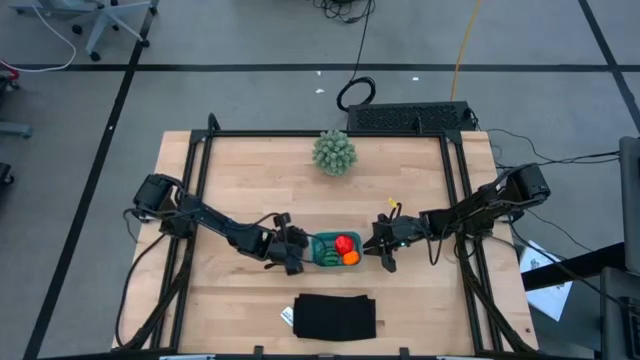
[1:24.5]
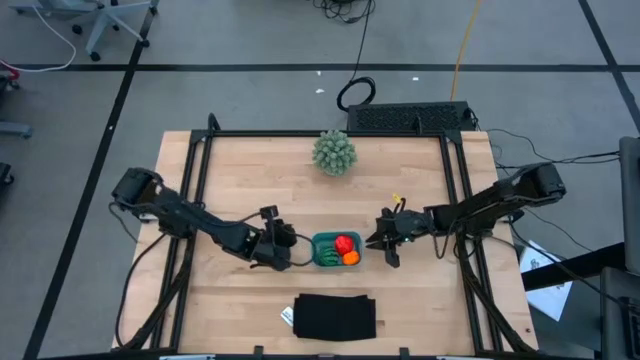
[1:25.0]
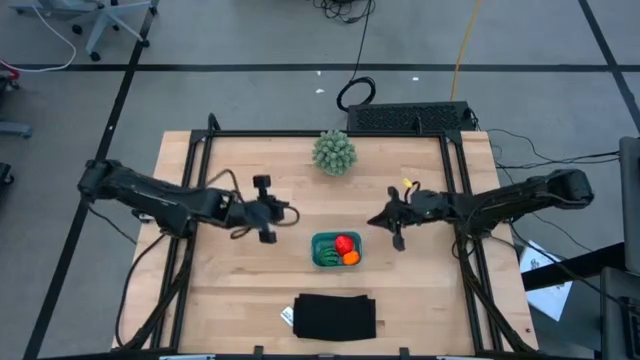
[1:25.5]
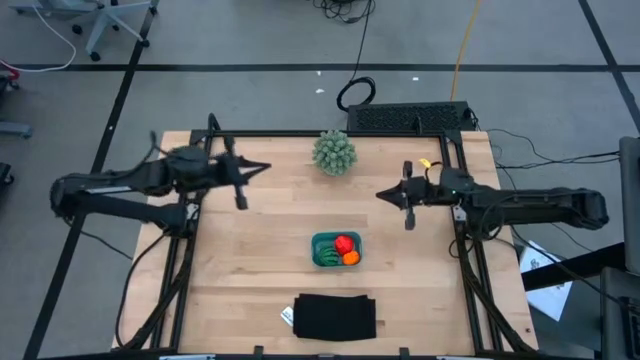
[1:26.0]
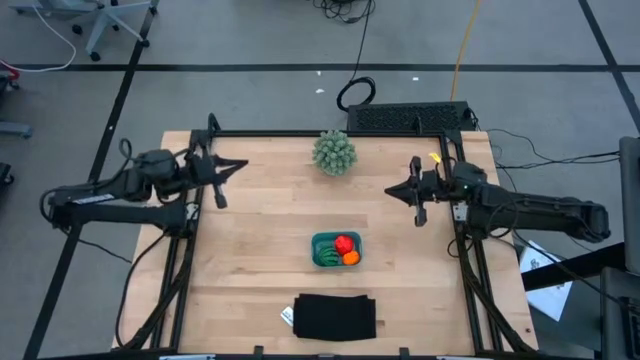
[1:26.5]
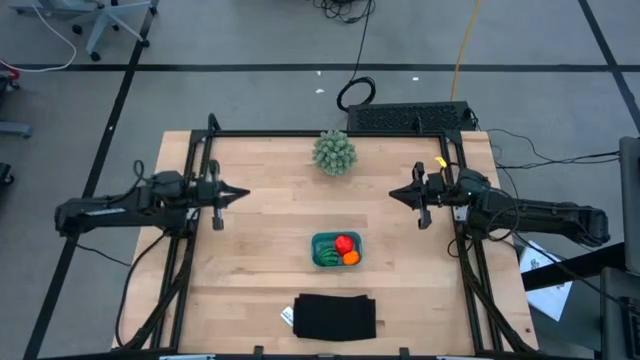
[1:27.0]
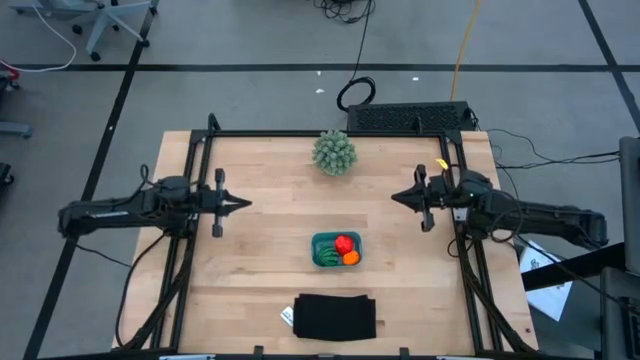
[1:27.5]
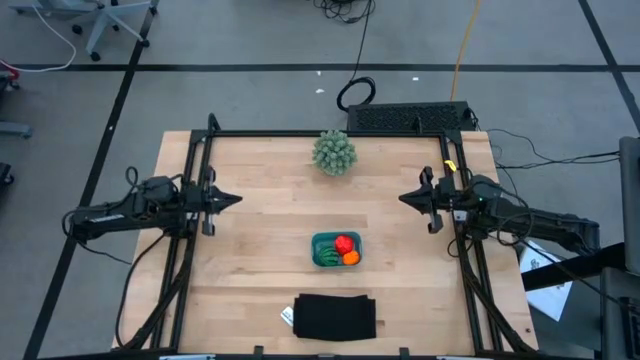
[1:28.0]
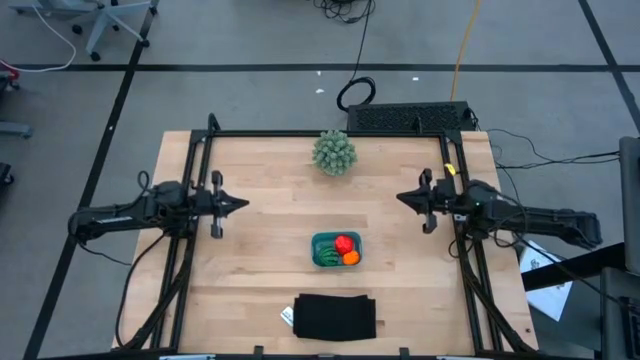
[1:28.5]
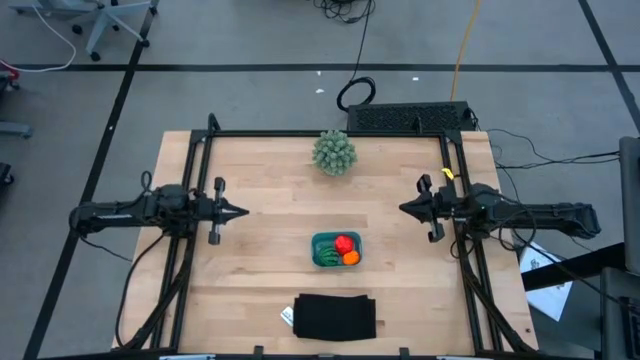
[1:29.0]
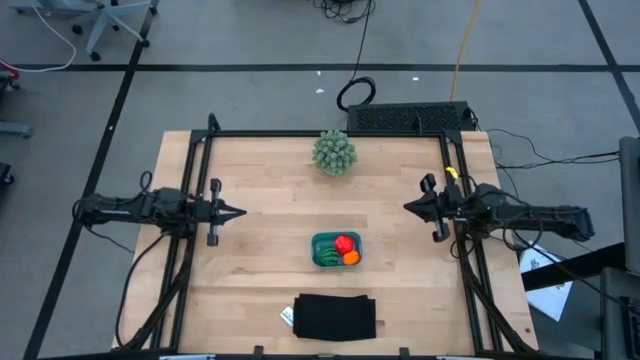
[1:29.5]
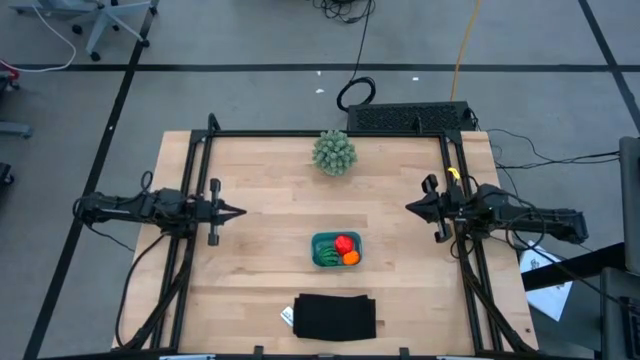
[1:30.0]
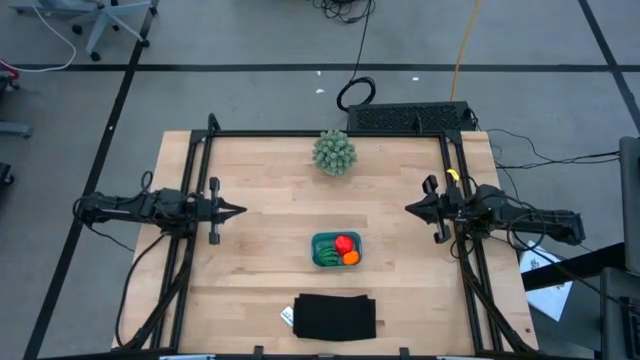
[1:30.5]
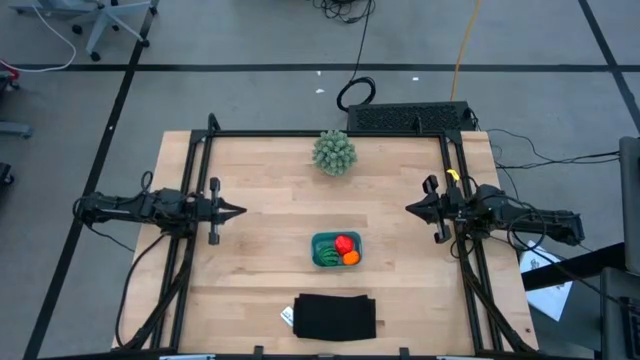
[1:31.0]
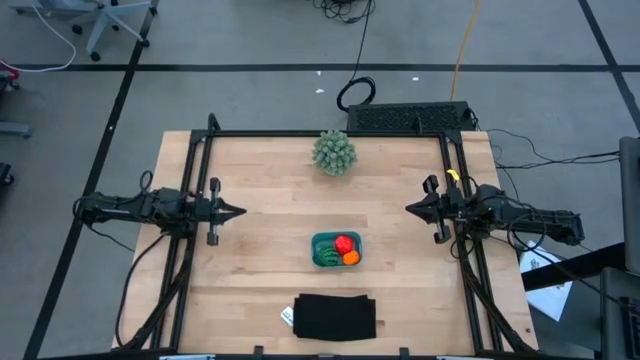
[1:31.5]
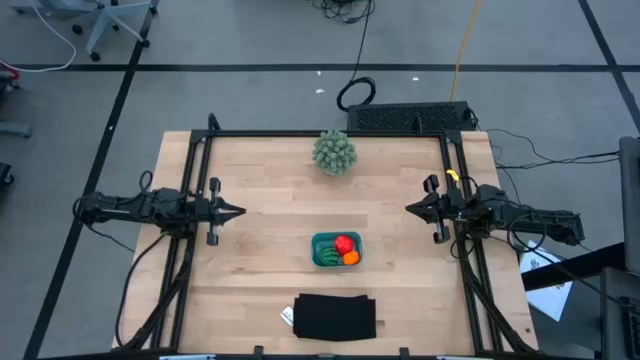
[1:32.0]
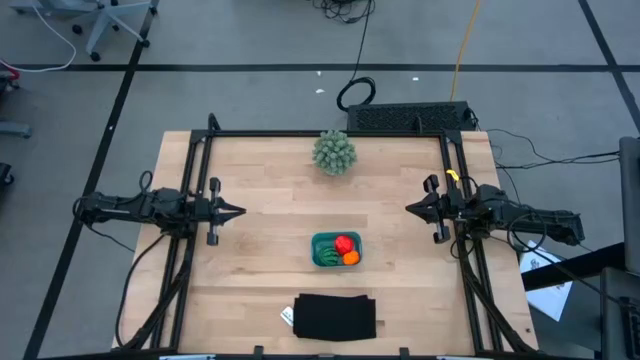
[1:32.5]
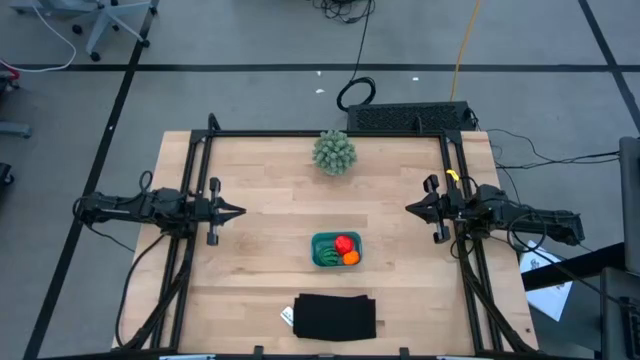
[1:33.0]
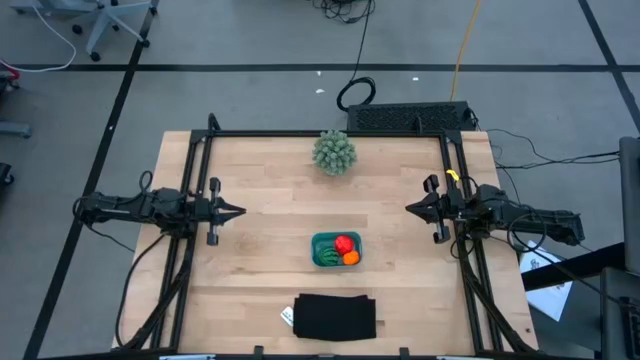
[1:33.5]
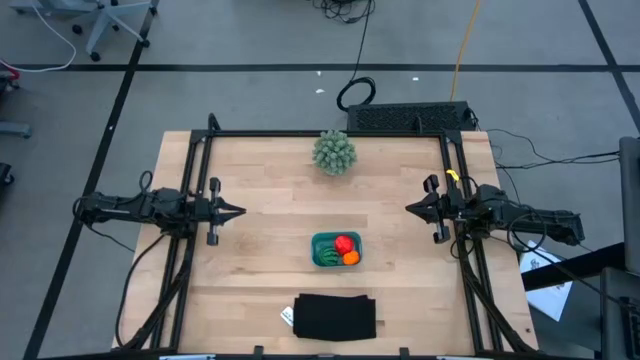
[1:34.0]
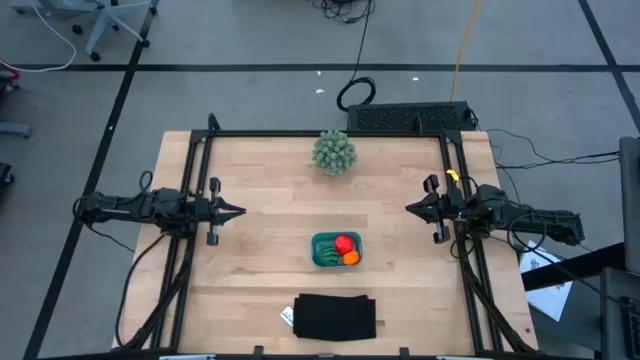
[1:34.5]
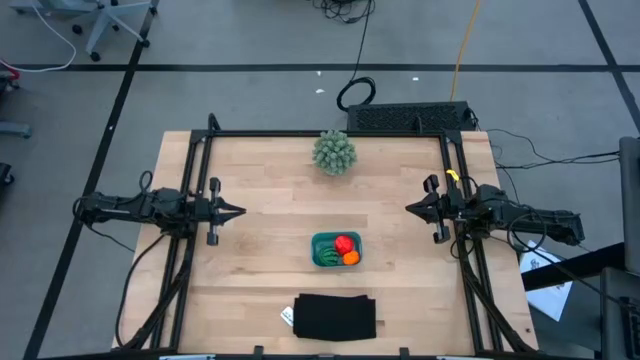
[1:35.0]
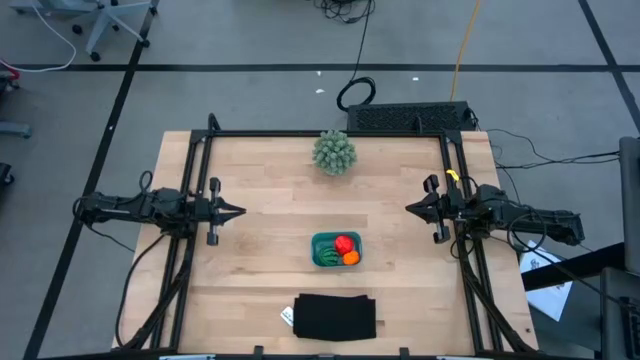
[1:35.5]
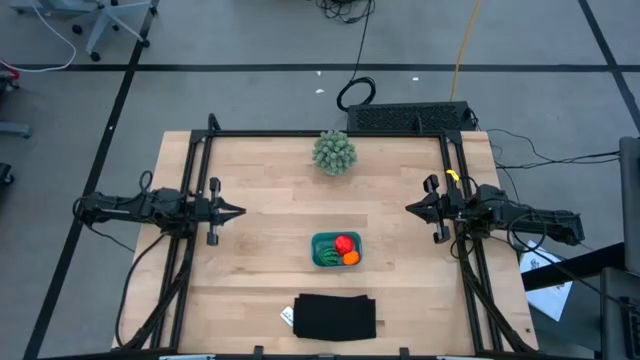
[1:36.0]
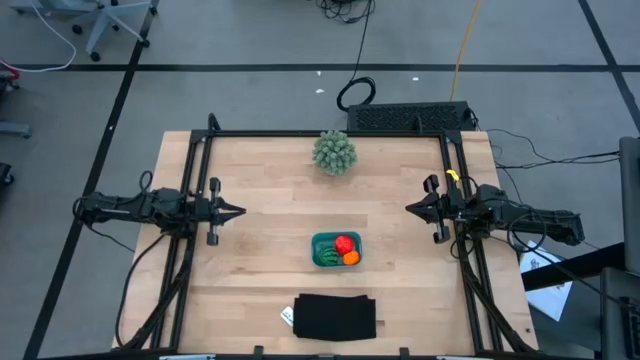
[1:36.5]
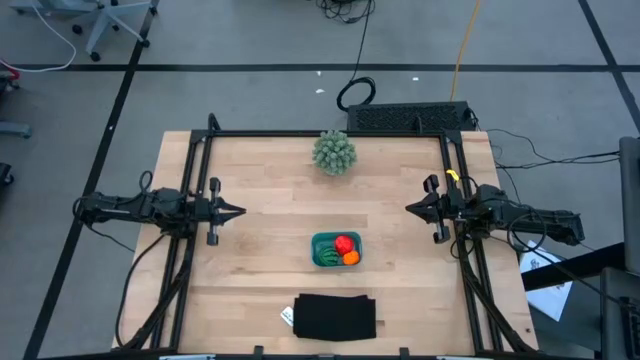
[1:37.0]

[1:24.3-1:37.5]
Task: Pick and placing Produce into tupperware
Return to Home Position

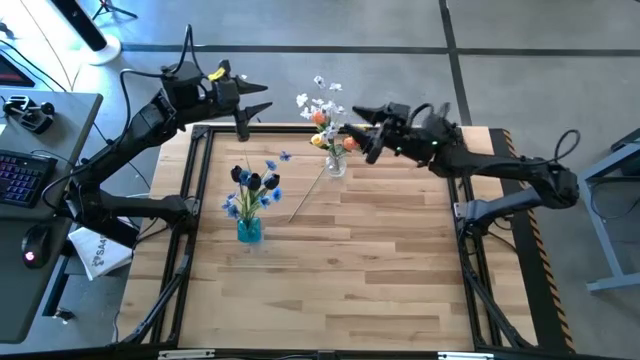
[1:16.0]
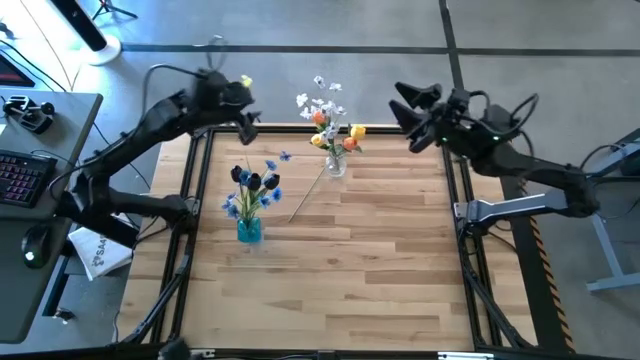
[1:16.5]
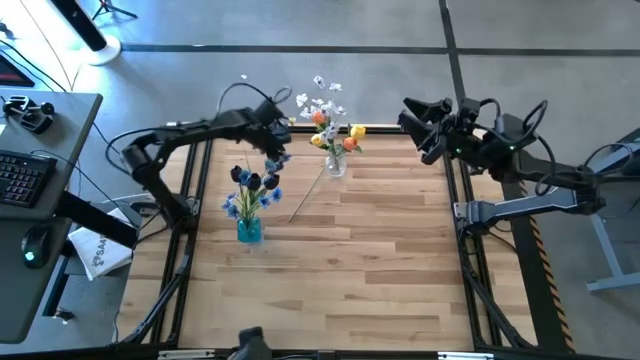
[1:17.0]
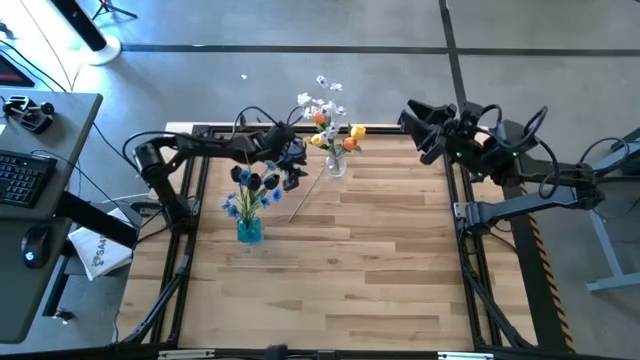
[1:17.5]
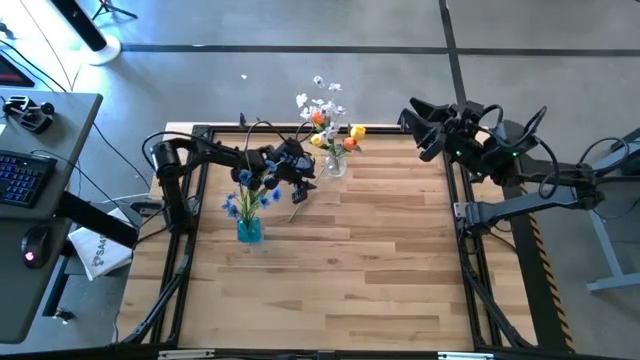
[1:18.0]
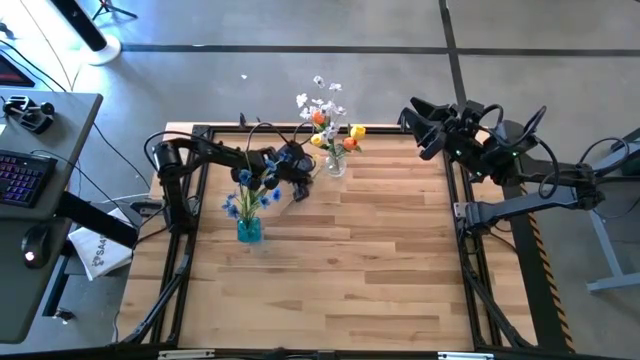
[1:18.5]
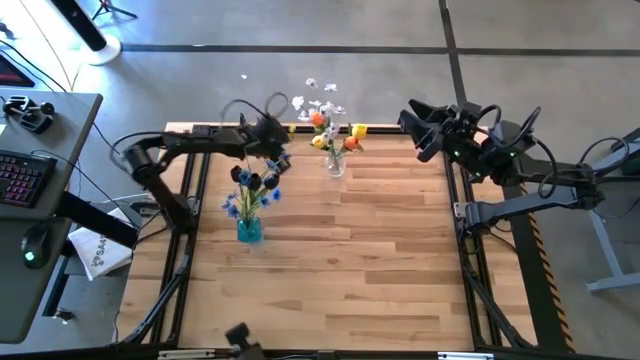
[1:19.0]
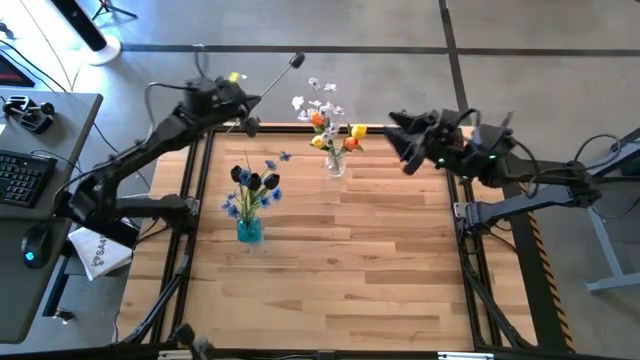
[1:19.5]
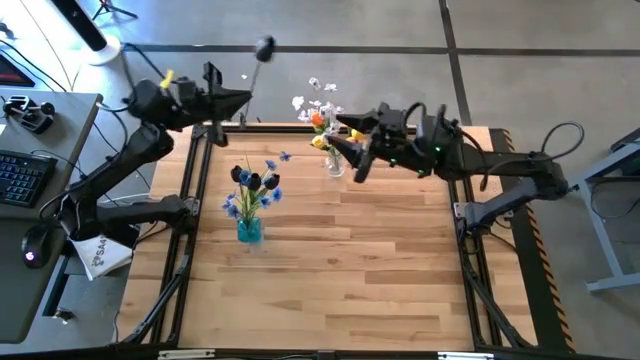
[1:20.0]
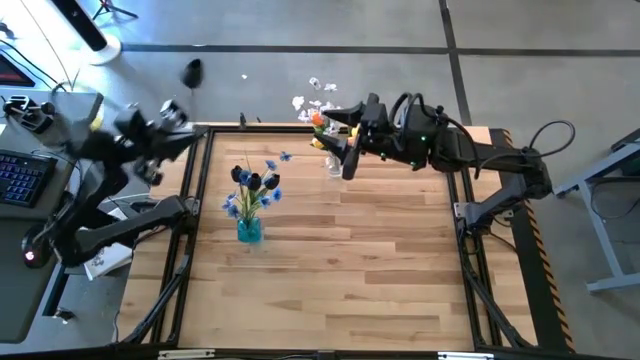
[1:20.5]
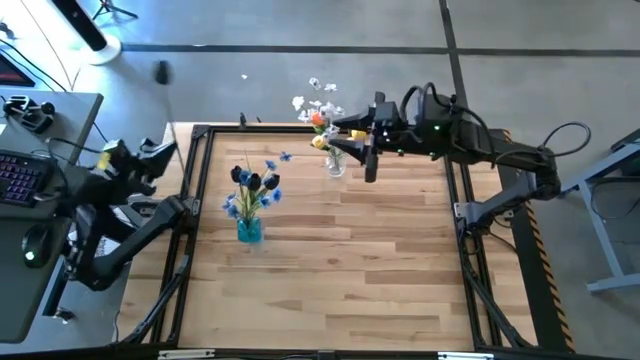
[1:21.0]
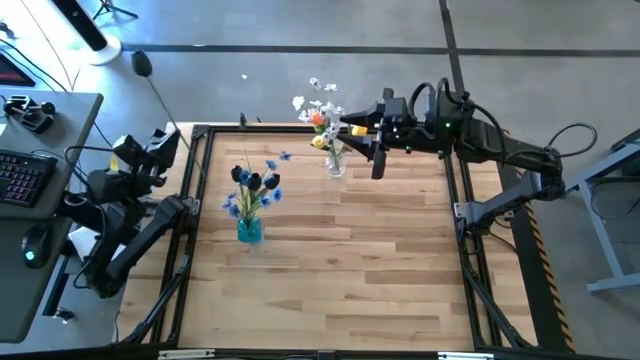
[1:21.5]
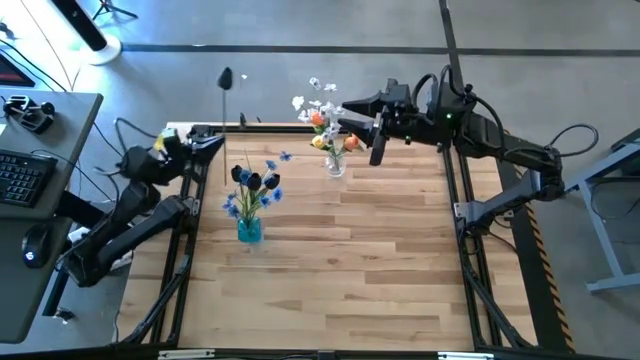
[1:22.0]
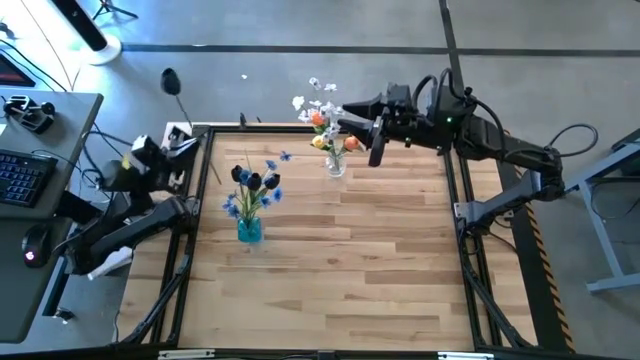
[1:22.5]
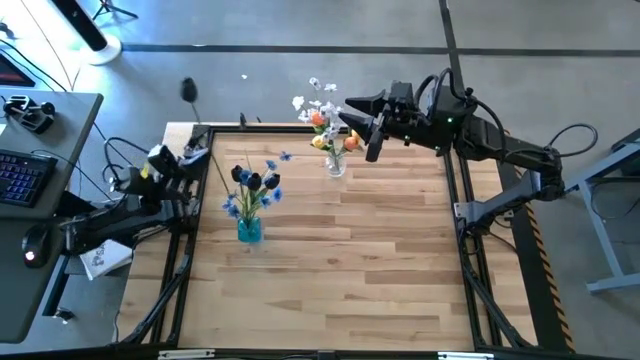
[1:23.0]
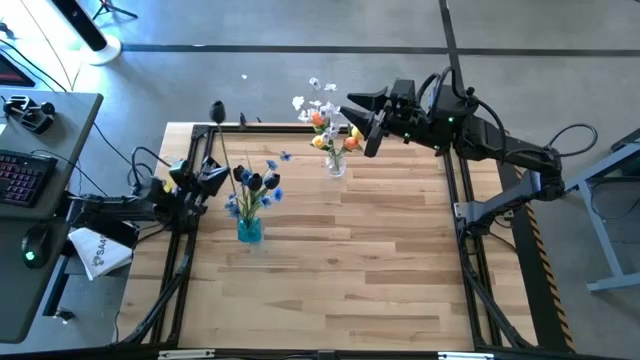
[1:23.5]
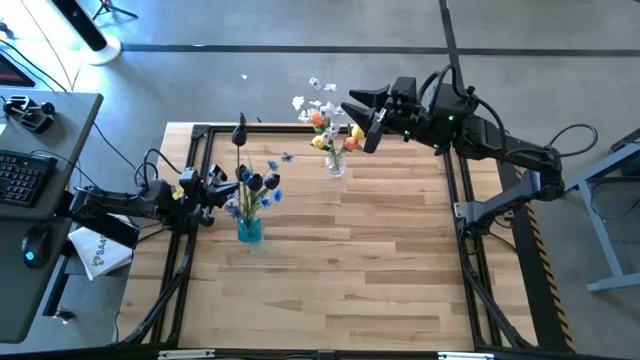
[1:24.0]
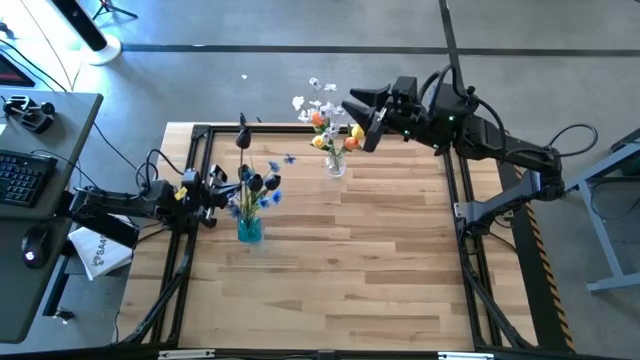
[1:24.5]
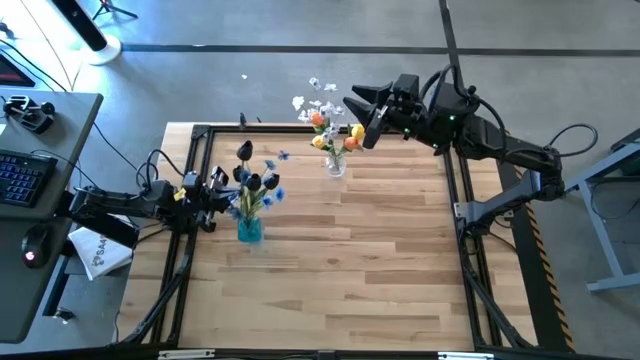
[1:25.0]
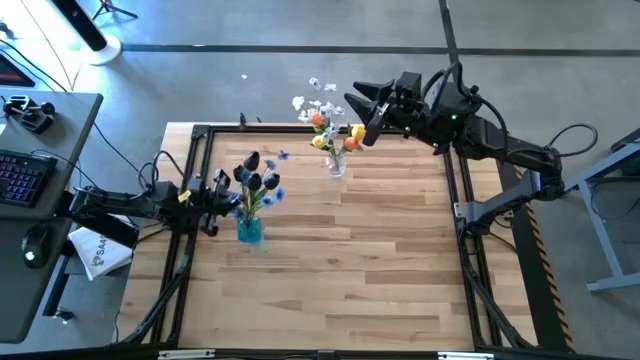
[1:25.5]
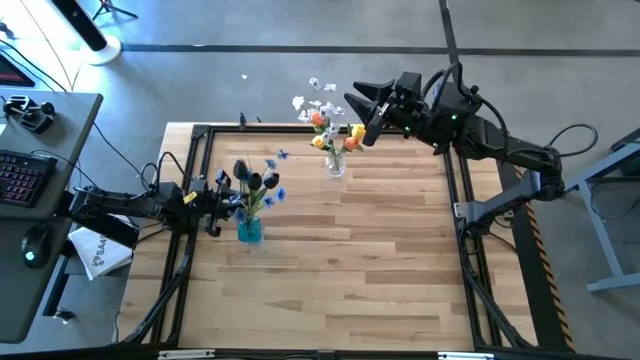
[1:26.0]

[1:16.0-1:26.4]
Task: Sort flowers into vase by color
Put the black flower into the blue vase
